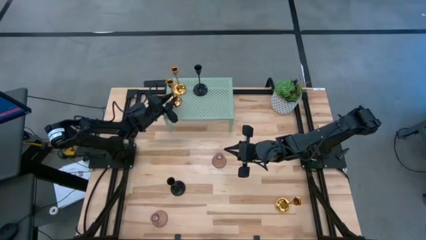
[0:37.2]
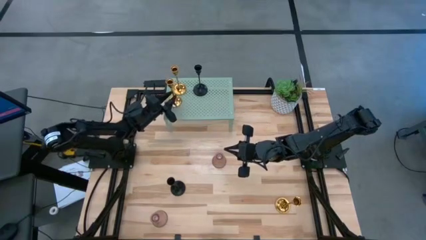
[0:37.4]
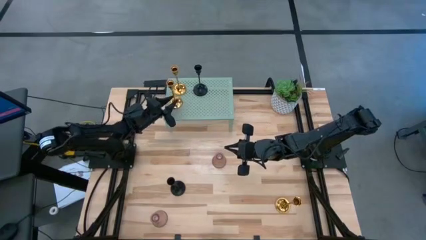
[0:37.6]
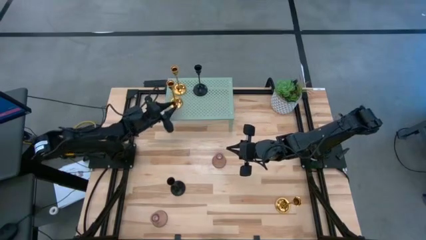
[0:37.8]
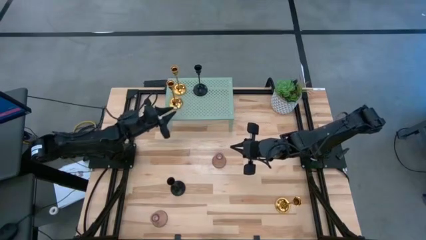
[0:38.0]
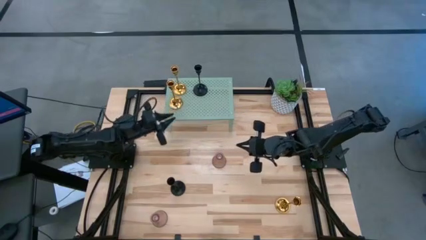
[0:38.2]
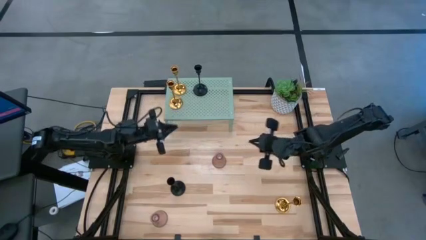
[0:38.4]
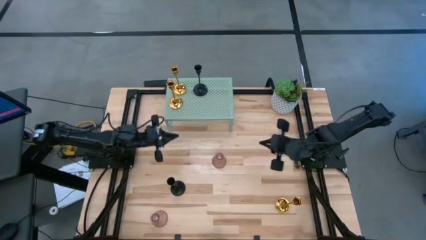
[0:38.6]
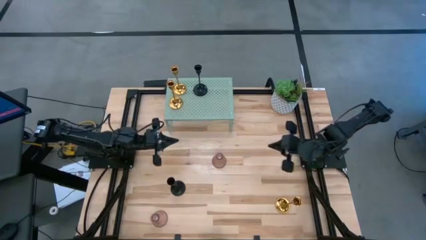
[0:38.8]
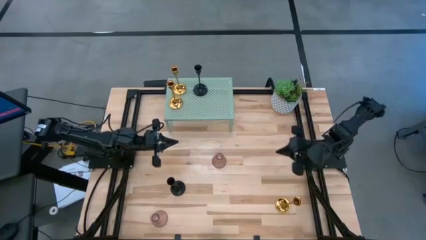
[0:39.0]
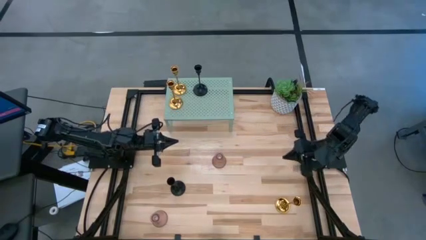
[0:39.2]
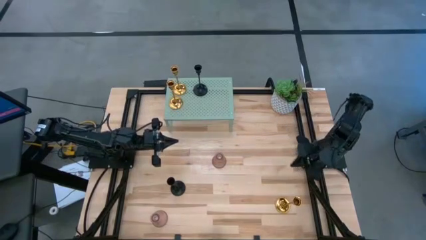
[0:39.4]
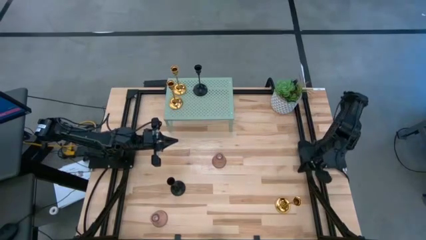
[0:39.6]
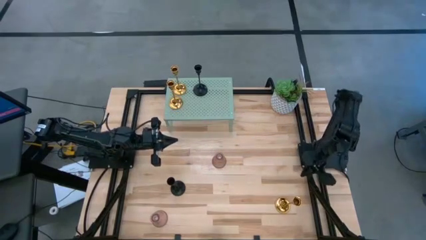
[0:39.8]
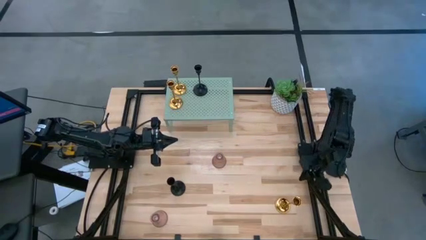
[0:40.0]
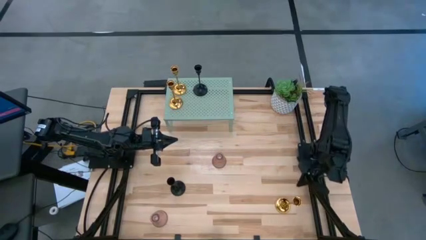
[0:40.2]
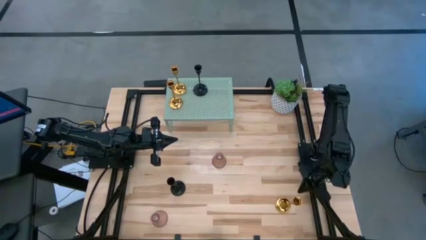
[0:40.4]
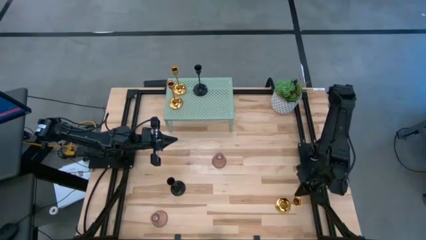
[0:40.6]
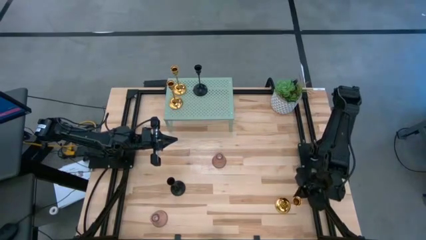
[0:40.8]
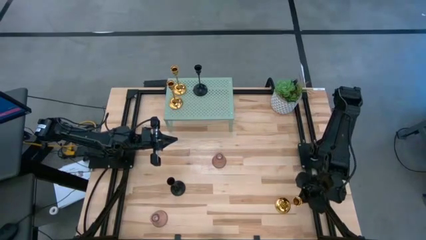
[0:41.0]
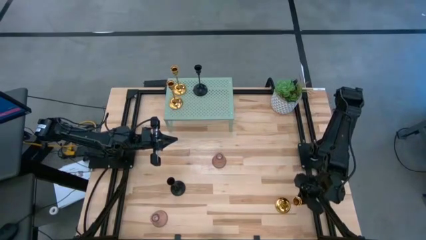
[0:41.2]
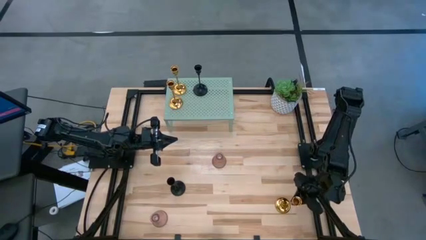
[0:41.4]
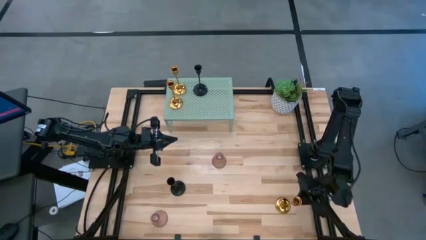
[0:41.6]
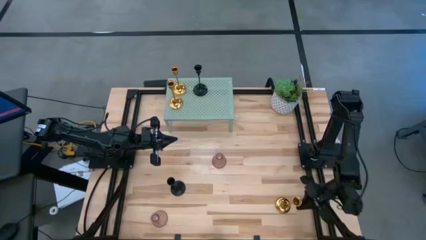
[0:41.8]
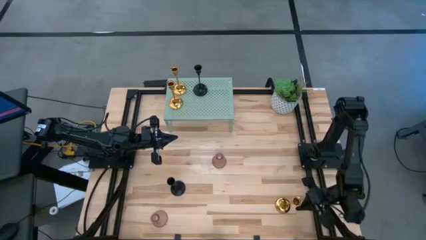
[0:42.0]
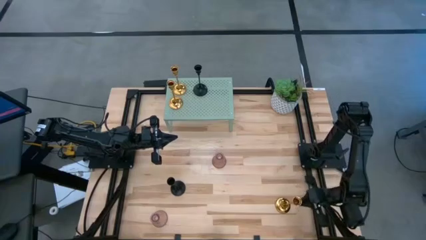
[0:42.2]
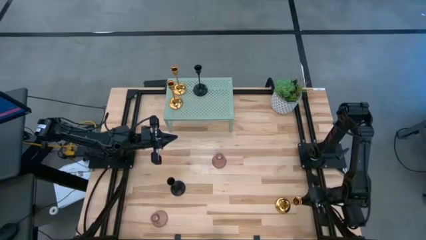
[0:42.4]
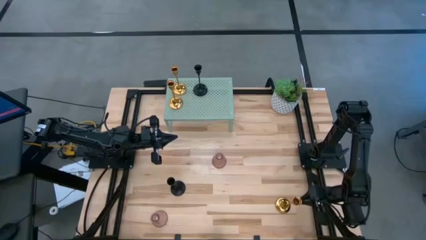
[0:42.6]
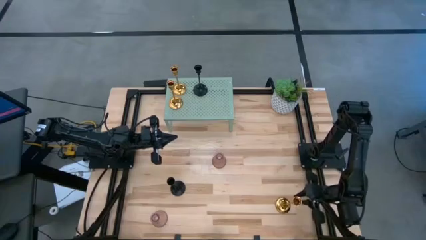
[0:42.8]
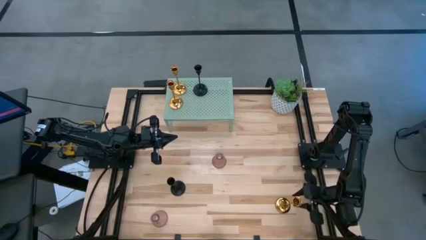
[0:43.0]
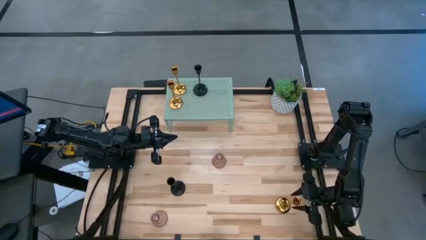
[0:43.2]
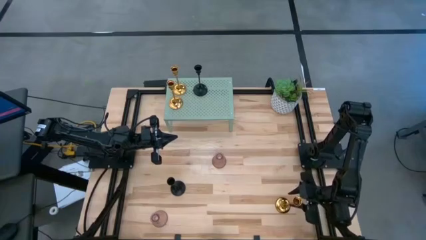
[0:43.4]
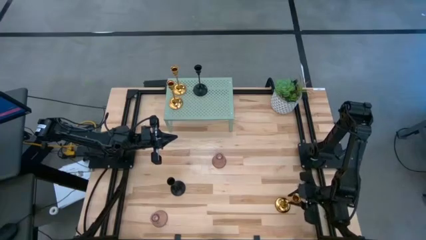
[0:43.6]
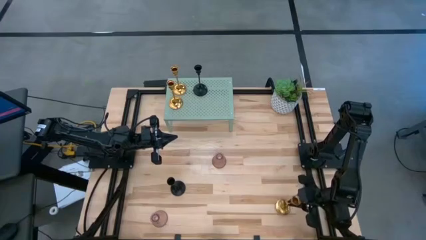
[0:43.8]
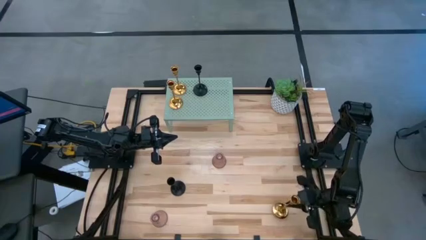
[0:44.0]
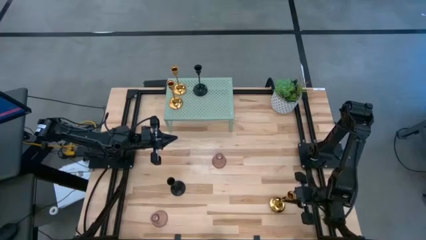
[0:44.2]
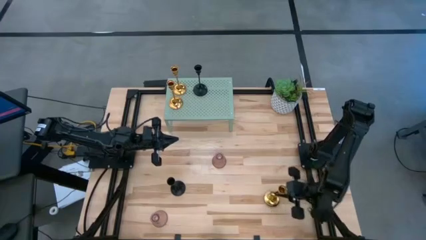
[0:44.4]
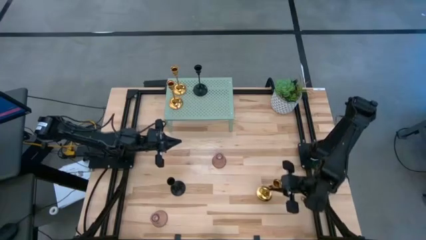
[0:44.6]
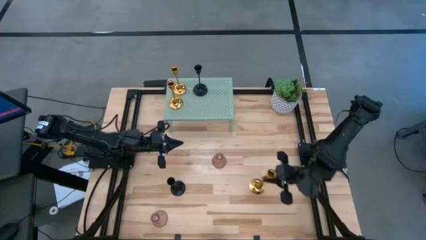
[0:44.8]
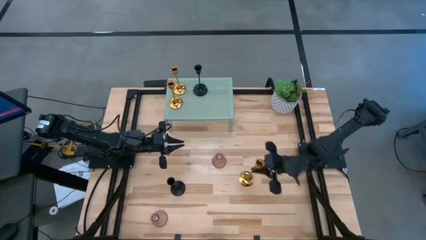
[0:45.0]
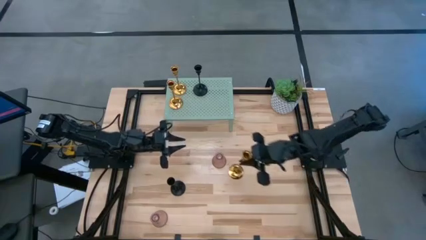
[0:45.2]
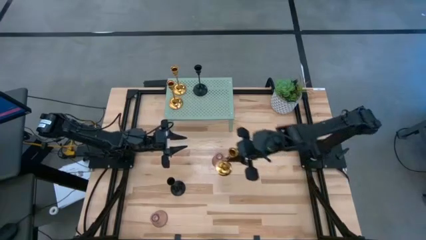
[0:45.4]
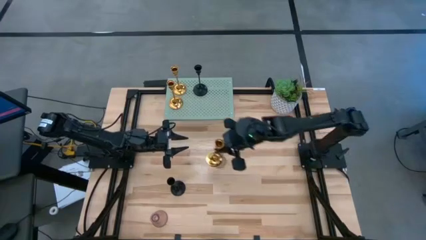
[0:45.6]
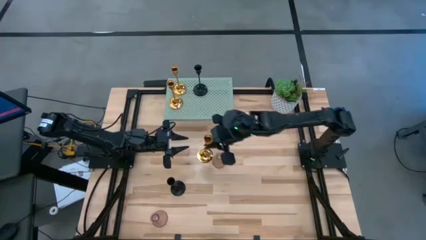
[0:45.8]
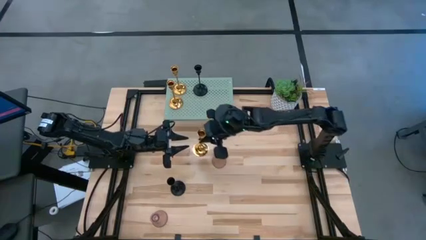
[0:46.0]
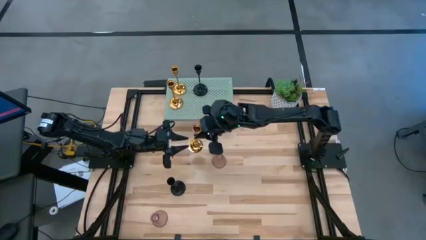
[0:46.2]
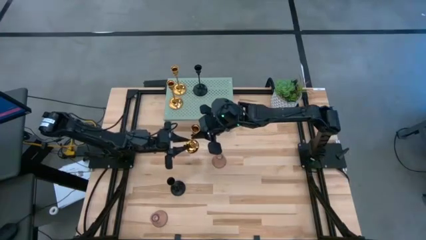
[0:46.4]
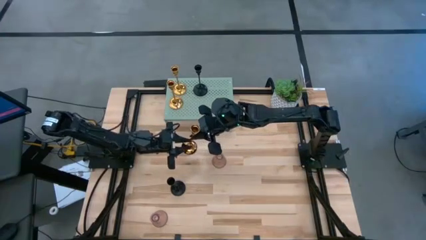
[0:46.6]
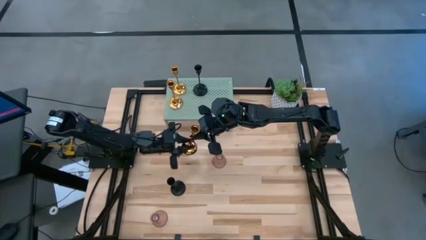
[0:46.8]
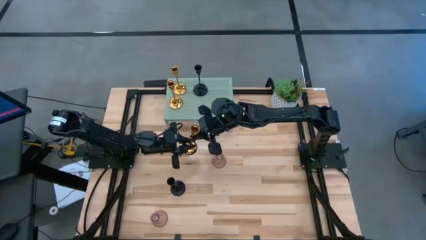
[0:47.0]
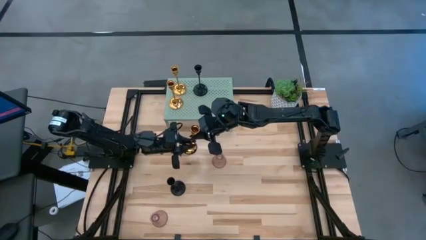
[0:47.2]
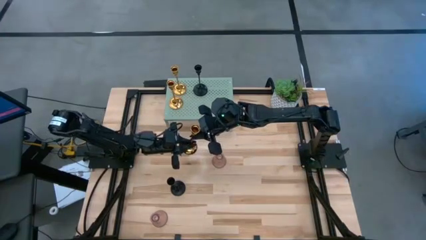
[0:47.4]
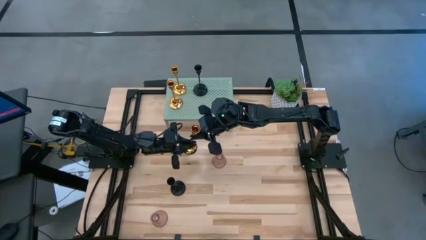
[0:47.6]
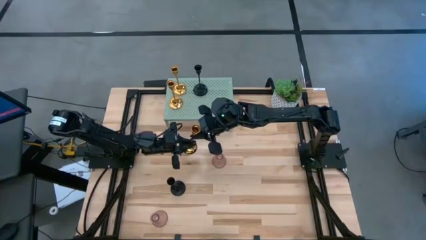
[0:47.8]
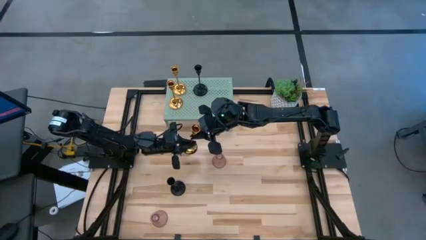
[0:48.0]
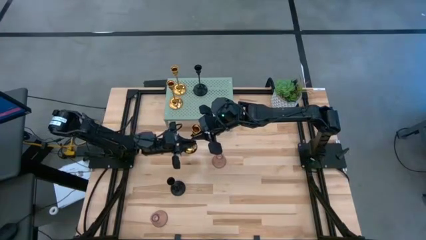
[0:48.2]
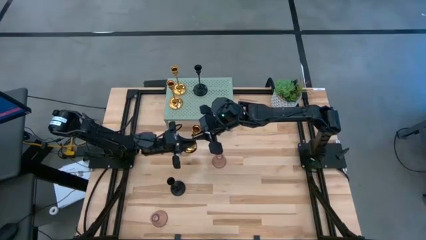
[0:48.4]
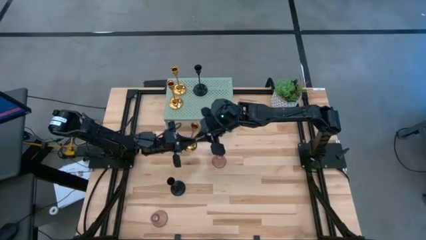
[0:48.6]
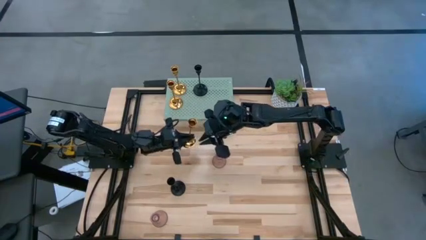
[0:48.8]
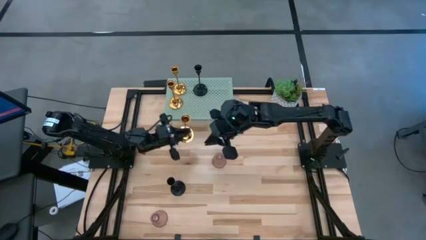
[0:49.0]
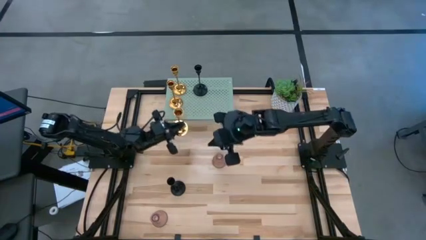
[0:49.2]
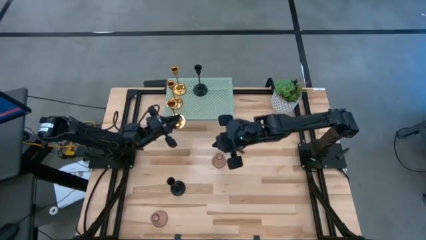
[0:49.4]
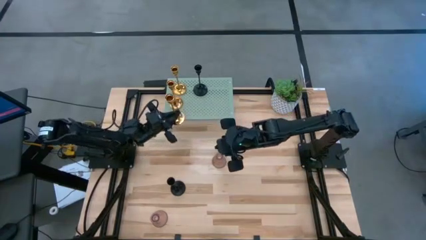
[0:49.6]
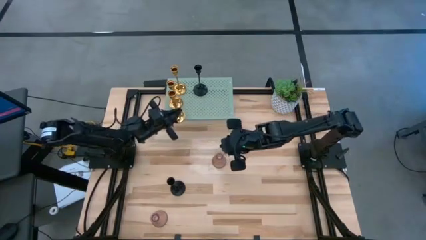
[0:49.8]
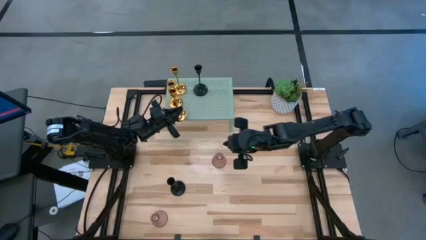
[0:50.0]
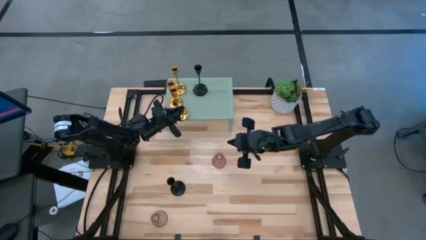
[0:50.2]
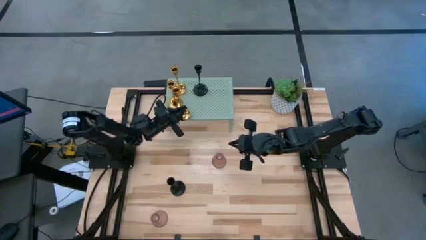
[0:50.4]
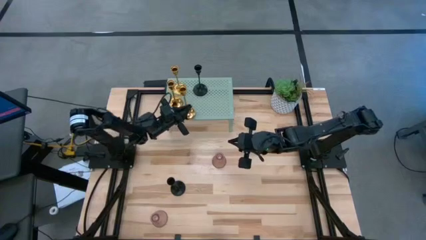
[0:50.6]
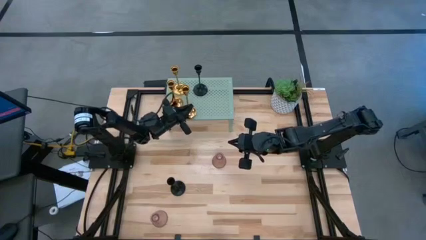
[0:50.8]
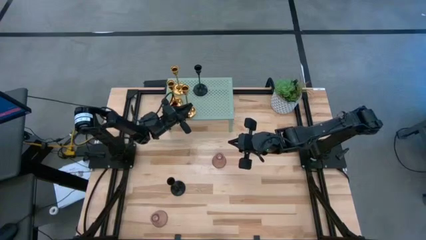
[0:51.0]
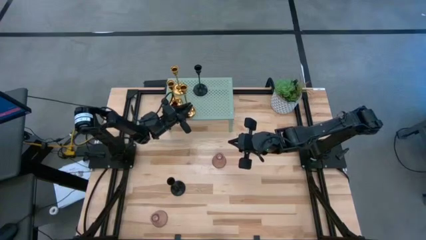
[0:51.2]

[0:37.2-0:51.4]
Task: Pick & Place candle stick holders
Put the gold candle holder on the shelf aligned with the other gold candle holders
